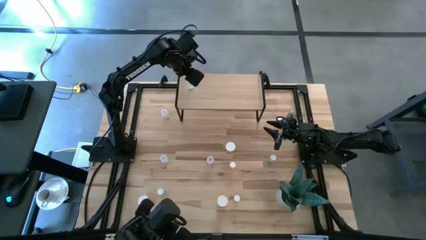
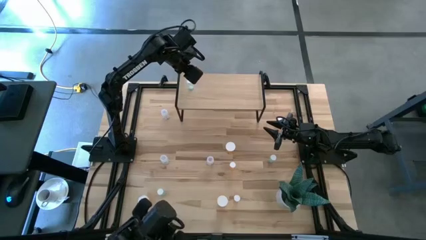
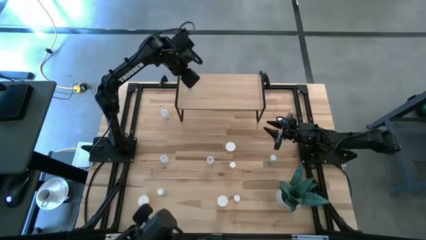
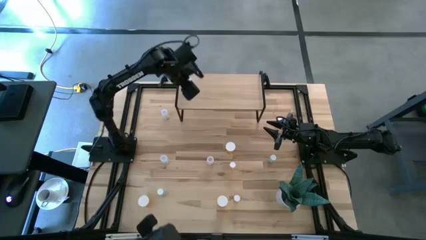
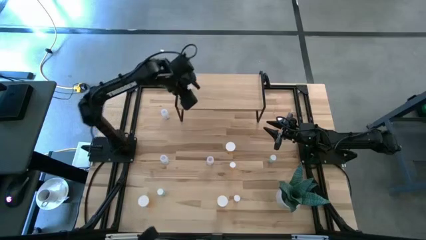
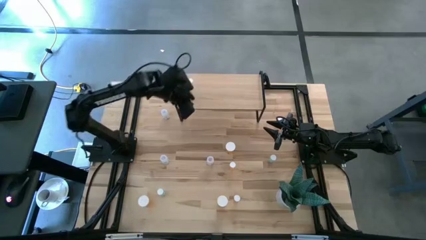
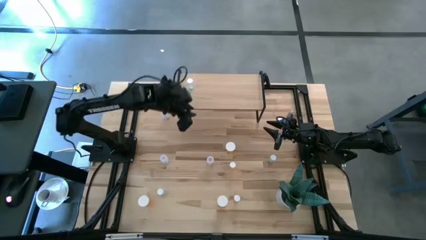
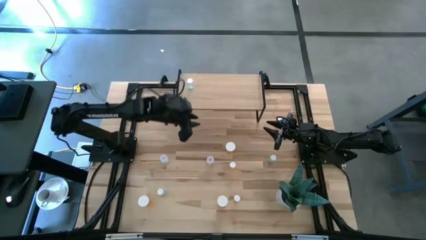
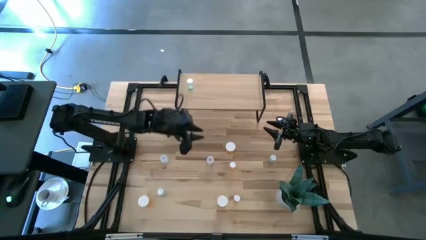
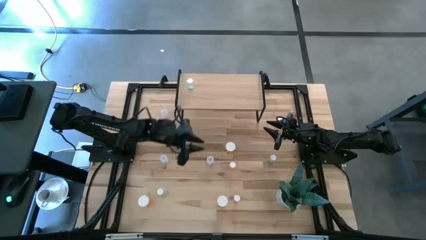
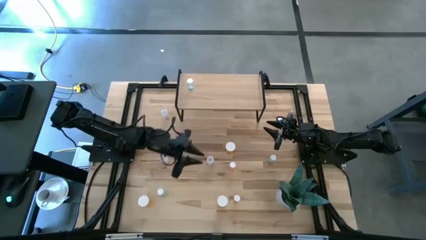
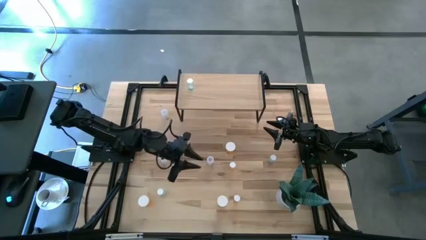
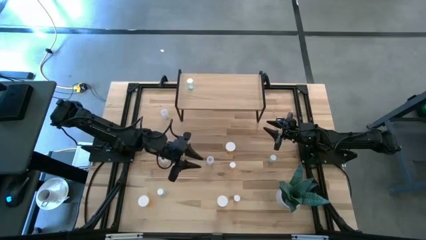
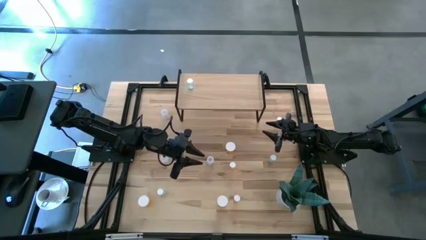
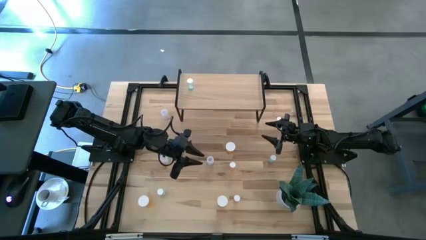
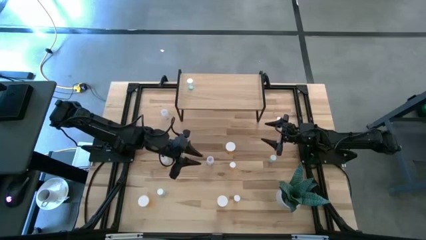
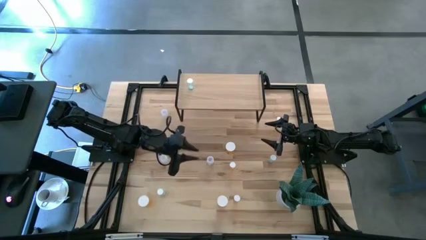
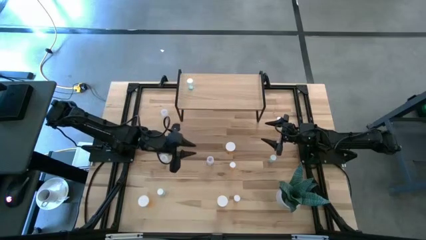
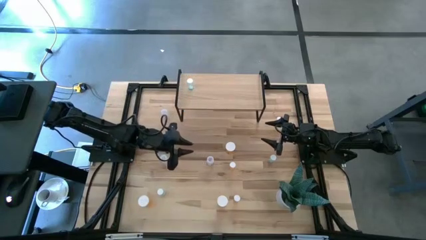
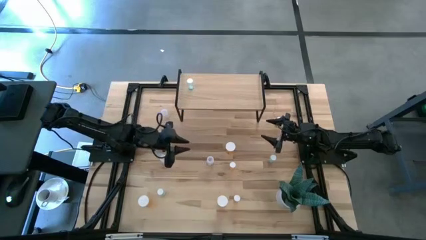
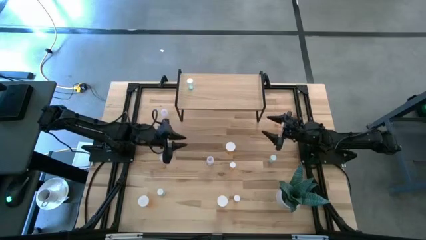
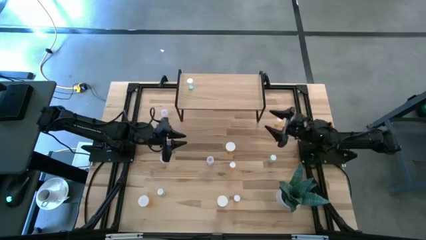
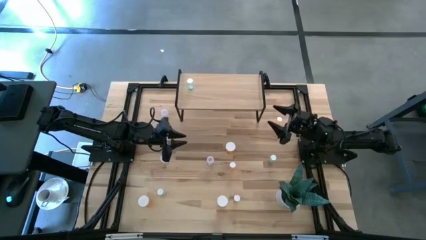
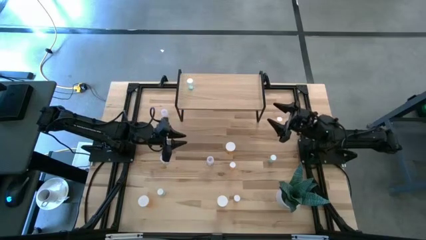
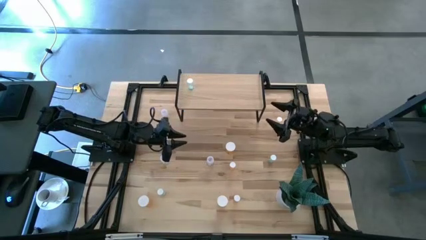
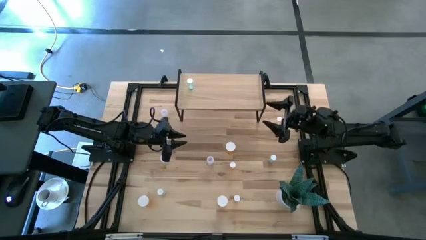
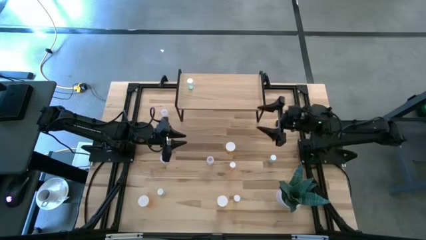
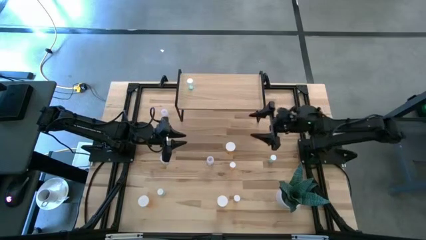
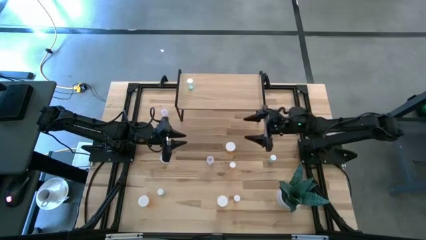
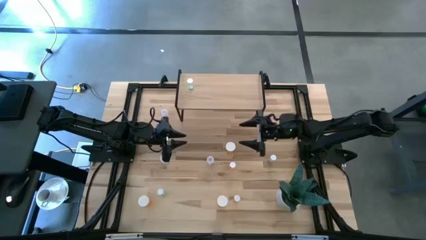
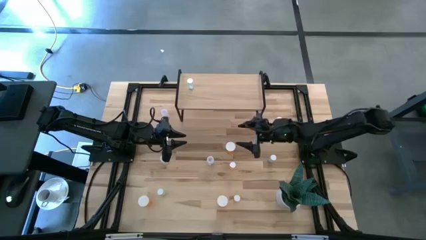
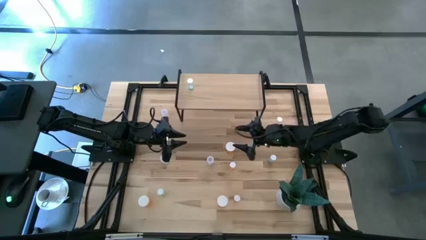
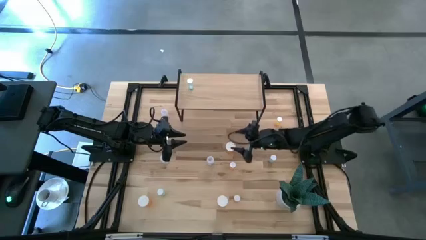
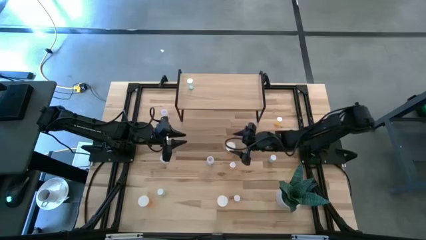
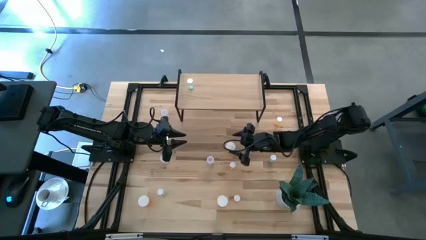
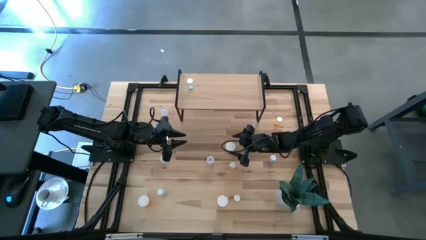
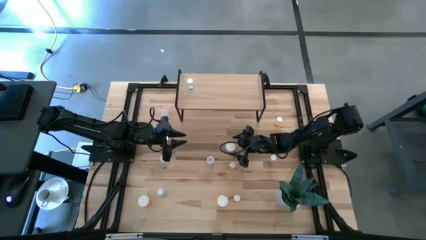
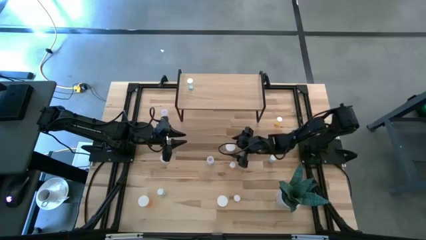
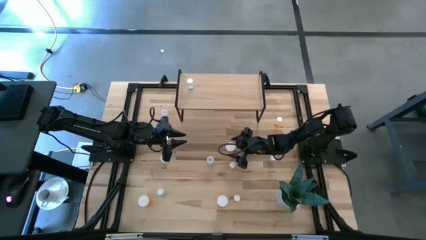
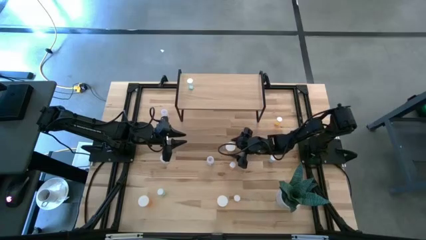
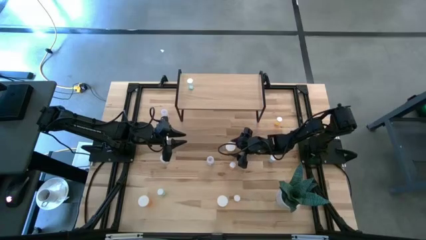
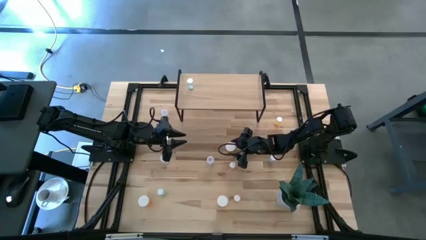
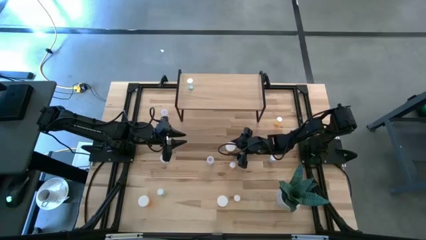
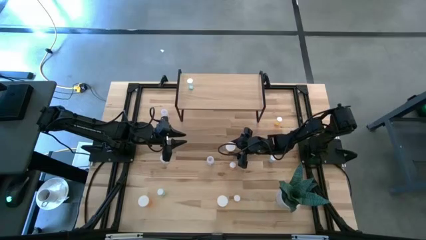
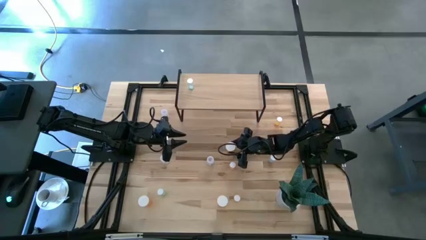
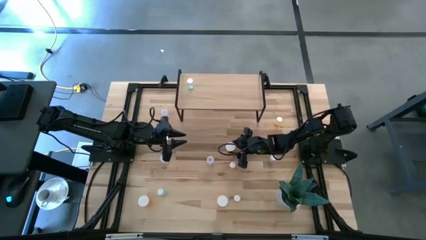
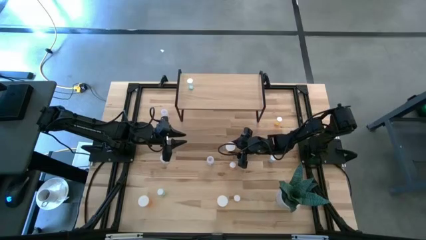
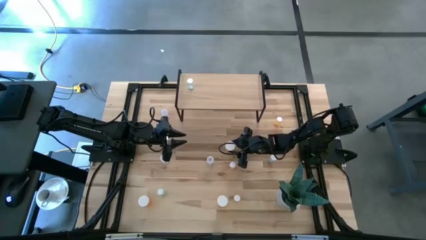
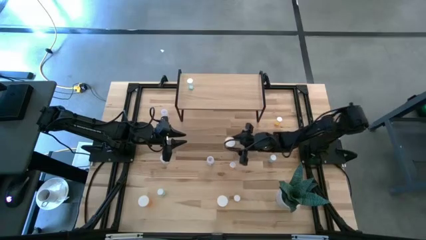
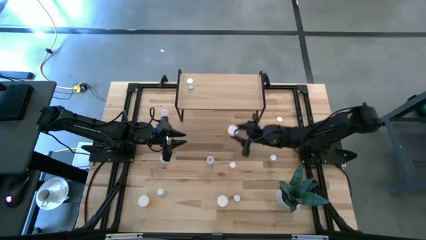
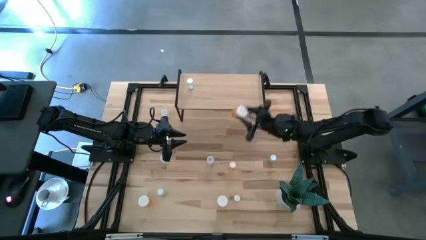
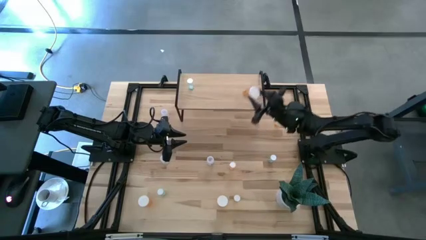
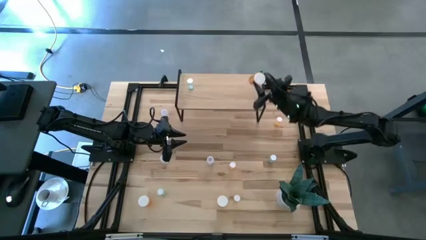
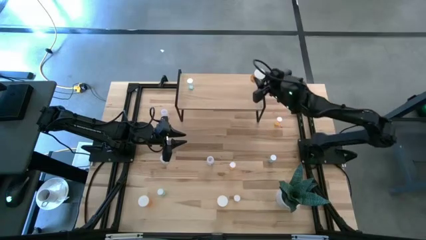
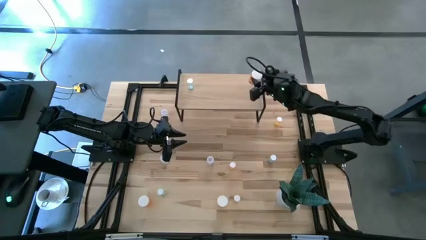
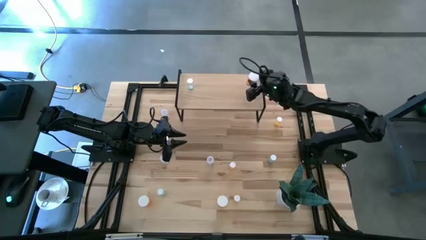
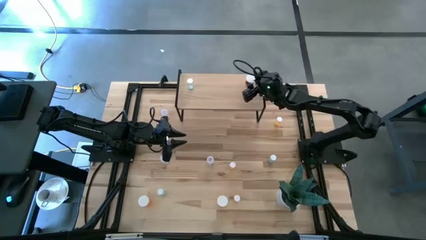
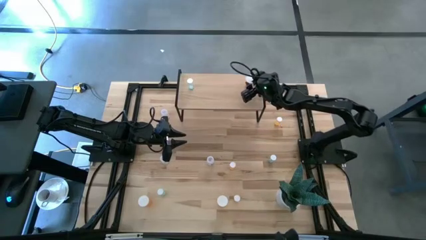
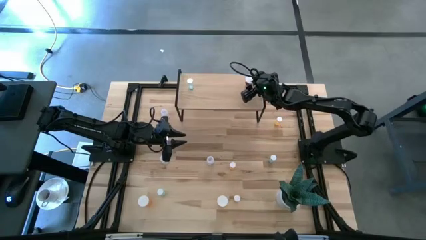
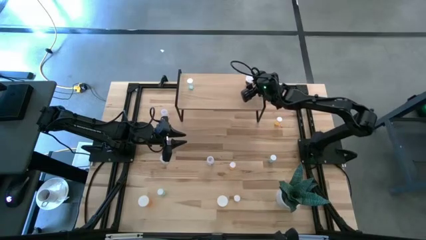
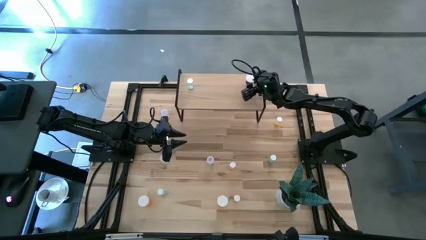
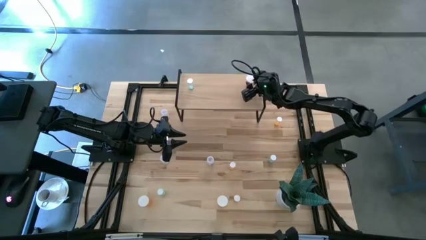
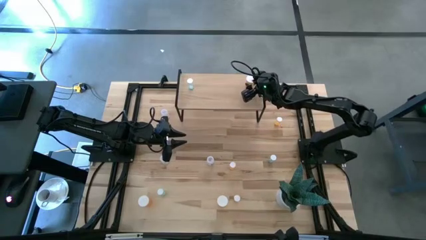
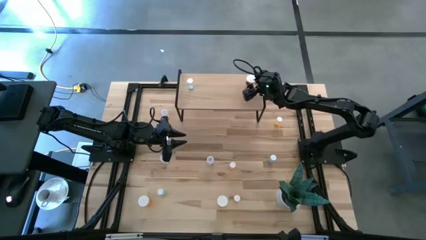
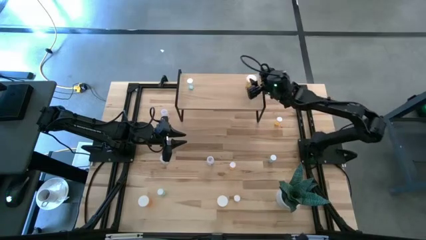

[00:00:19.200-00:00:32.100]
Task: Pick and place medicine bottles onto shelf by color
Put the top right large orange pill bottle on the shelf

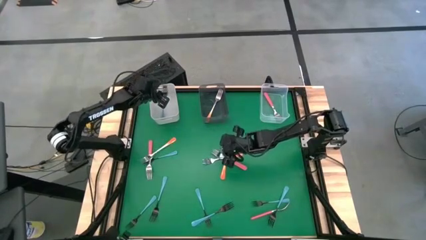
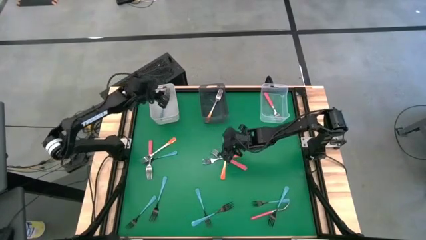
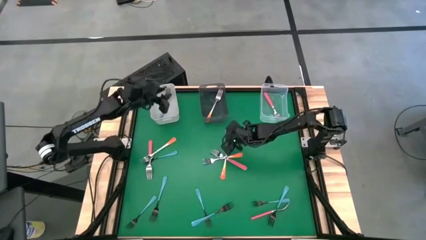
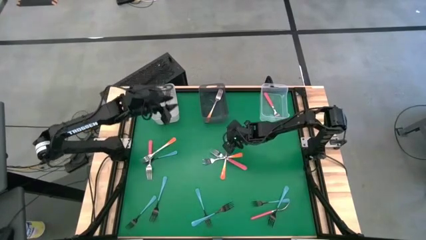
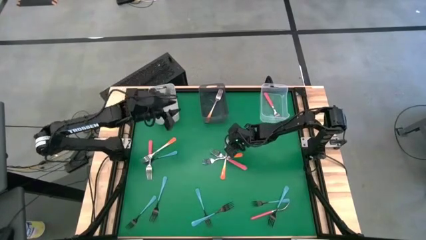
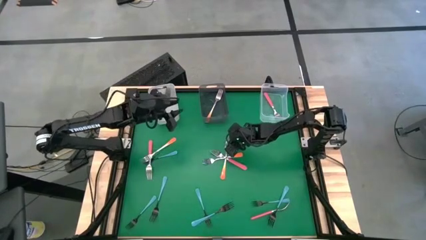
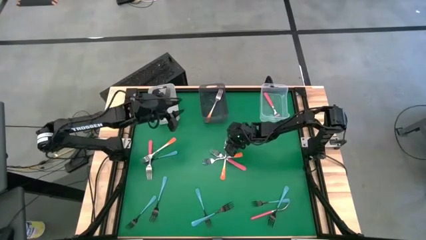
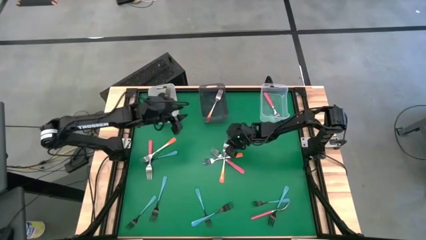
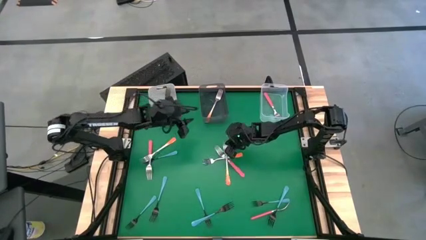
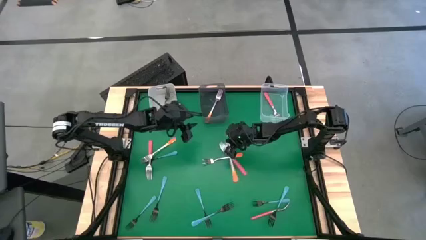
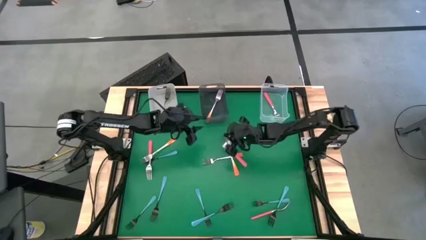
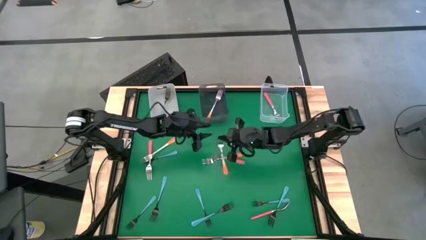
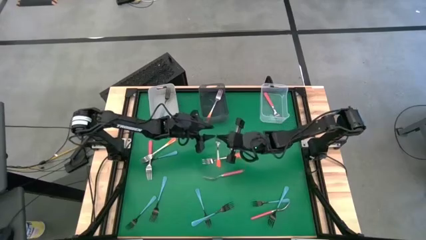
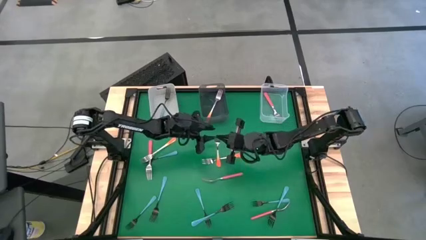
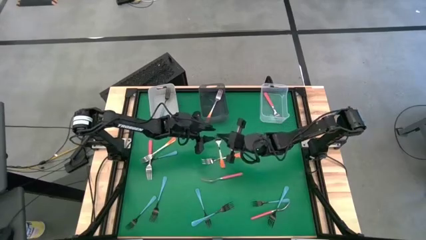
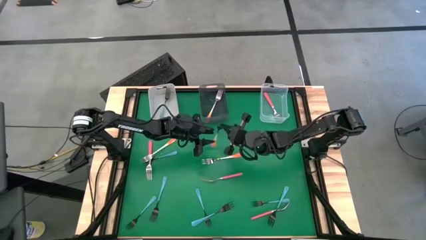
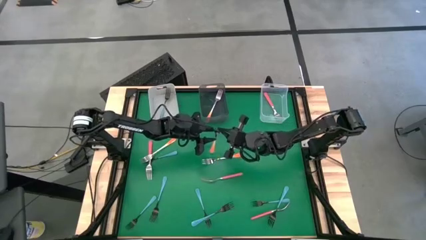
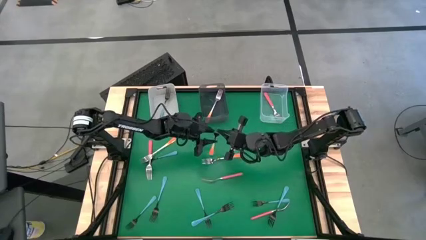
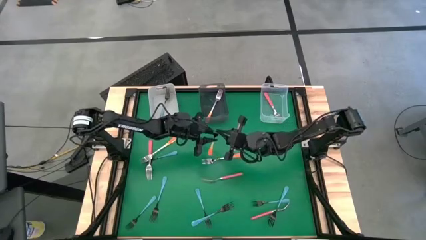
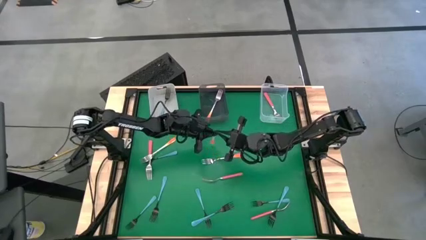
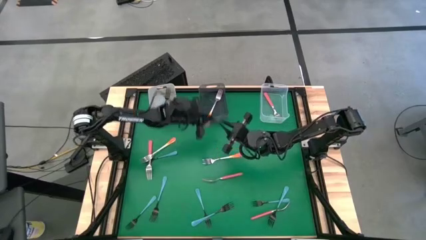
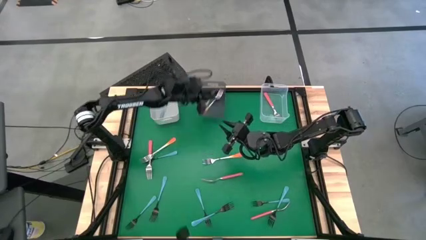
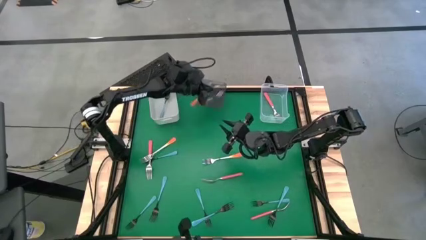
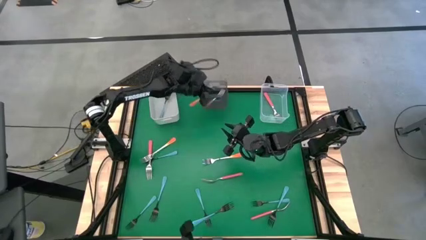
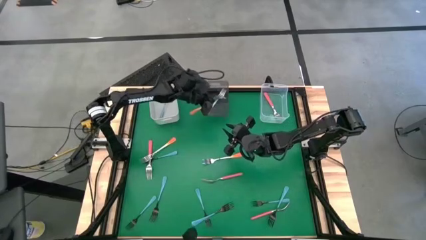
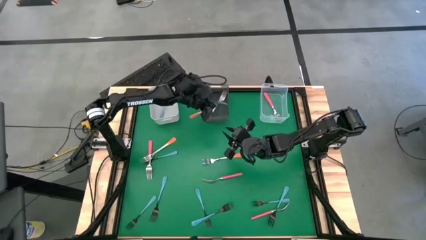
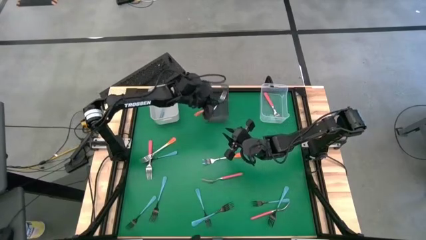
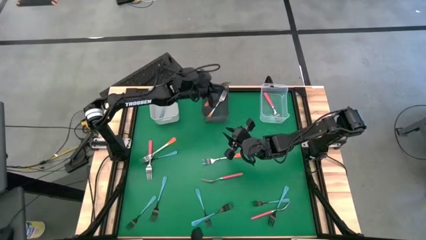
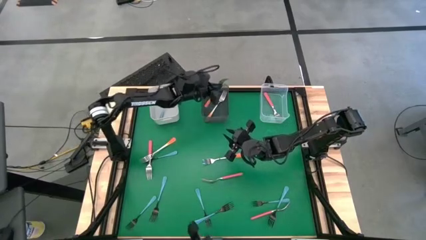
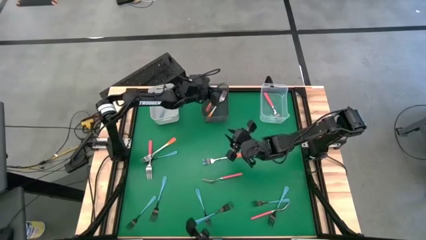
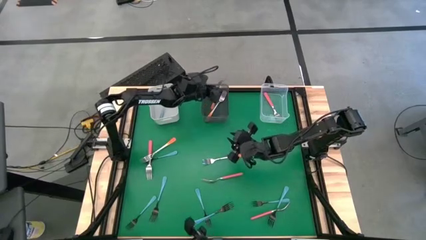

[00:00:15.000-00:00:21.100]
Task: Sort silverware by color (type)
Put the orange fork into the black bin
